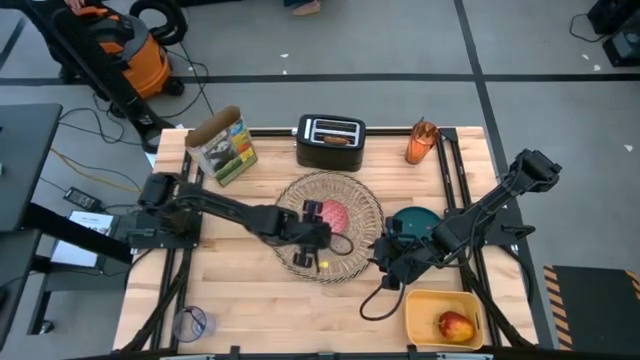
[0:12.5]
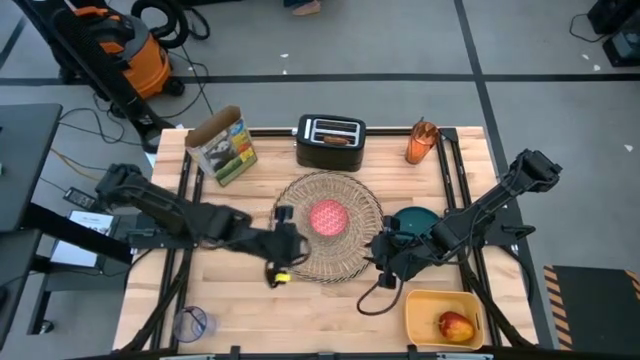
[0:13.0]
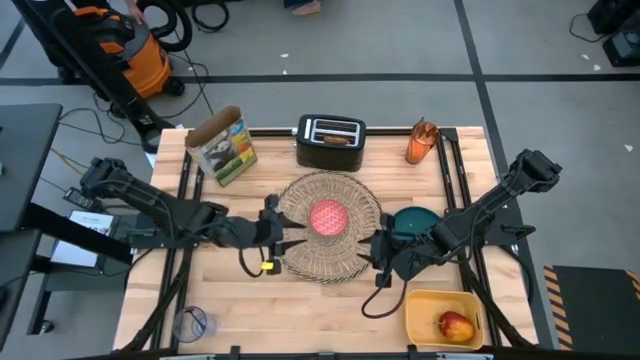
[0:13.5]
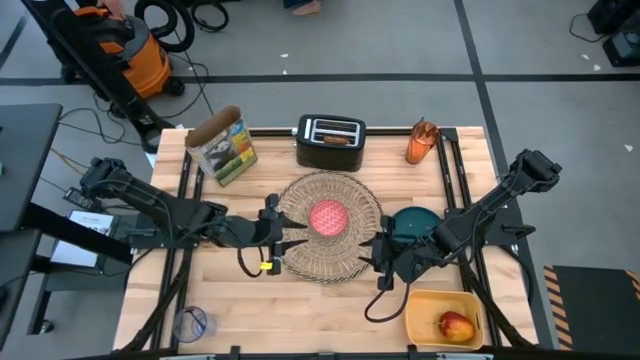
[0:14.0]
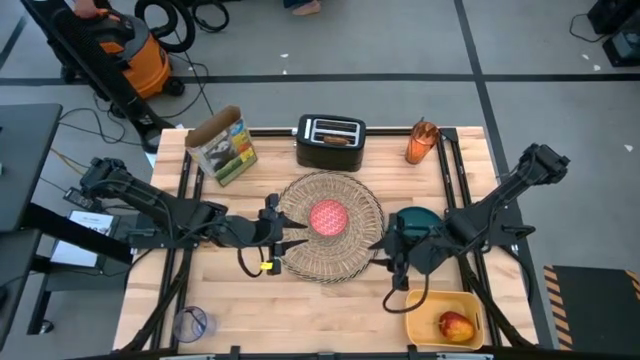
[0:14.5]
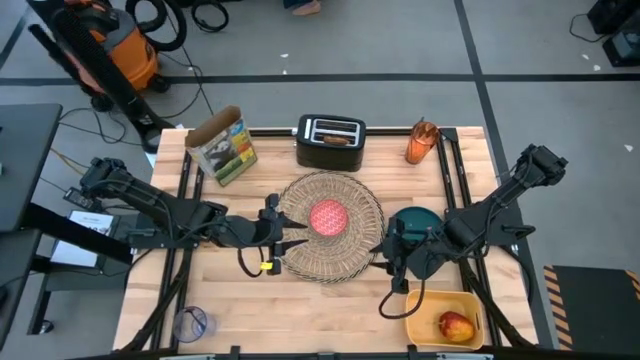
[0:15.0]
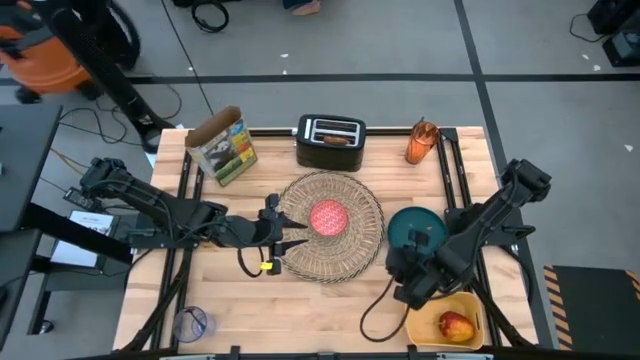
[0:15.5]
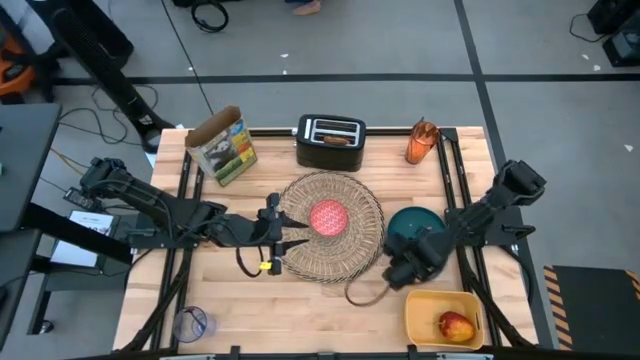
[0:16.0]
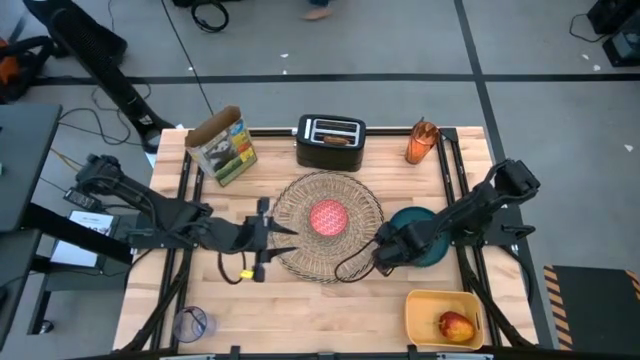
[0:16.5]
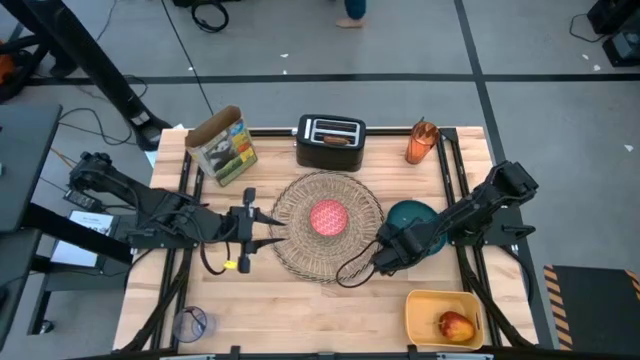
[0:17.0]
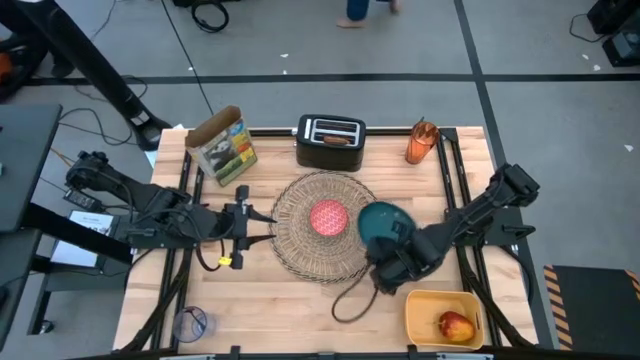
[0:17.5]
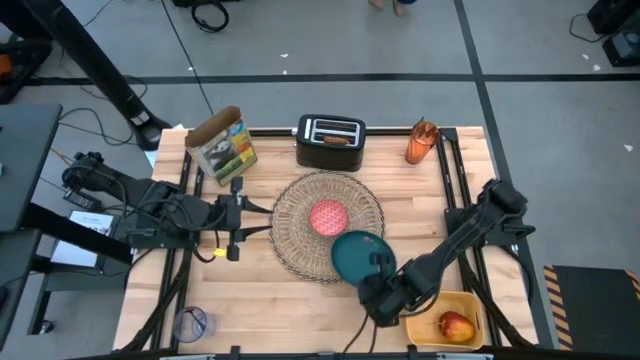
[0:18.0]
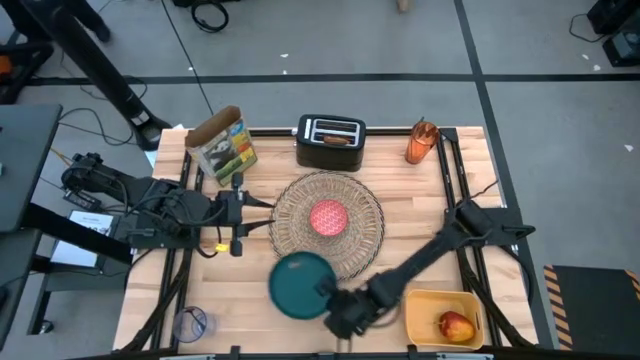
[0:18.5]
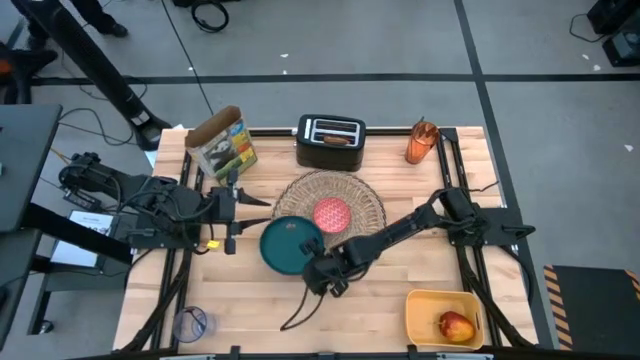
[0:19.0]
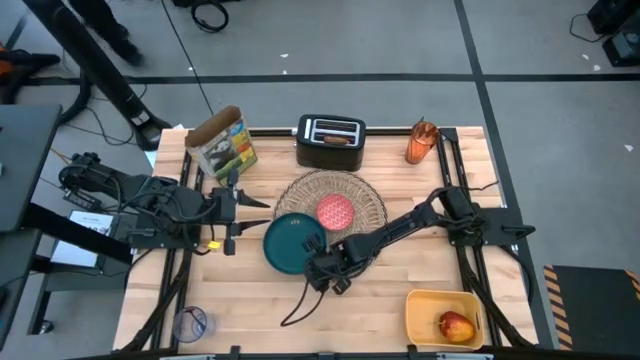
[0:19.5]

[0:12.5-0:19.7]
Task: Arrange a breakfast setting
Put the plate on the place mat

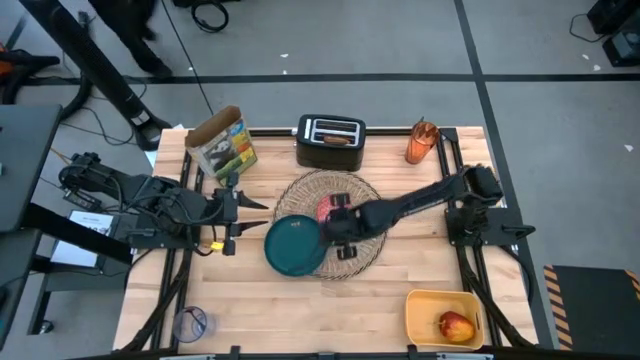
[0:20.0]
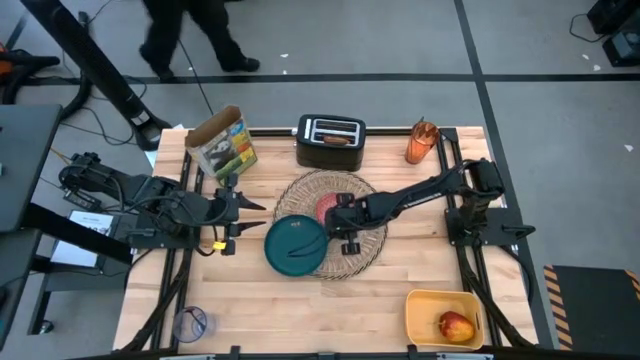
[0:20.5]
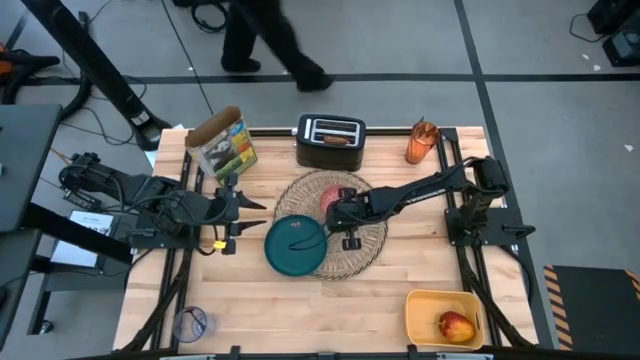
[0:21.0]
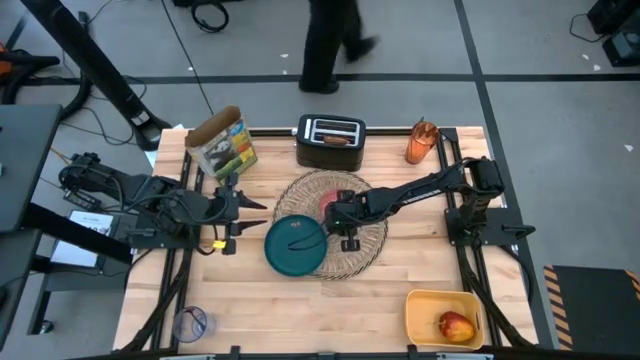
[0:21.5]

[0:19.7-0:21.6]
Adjust the bowl on the place mat

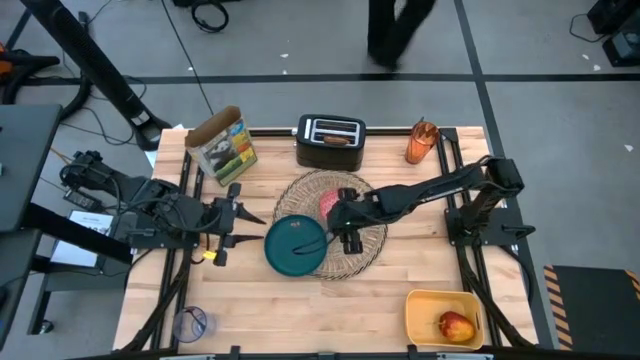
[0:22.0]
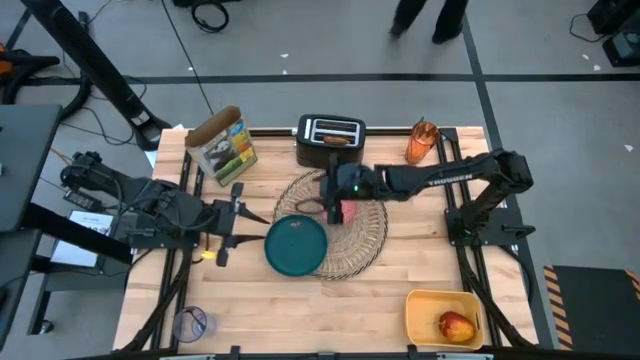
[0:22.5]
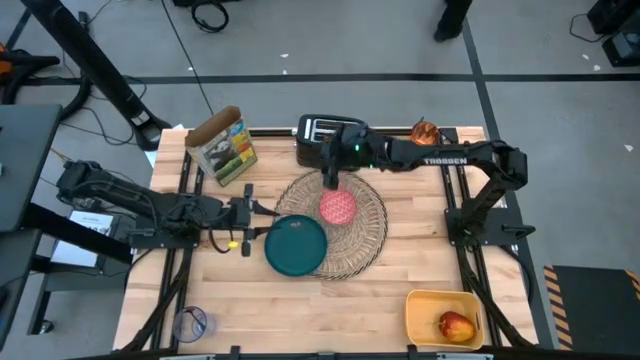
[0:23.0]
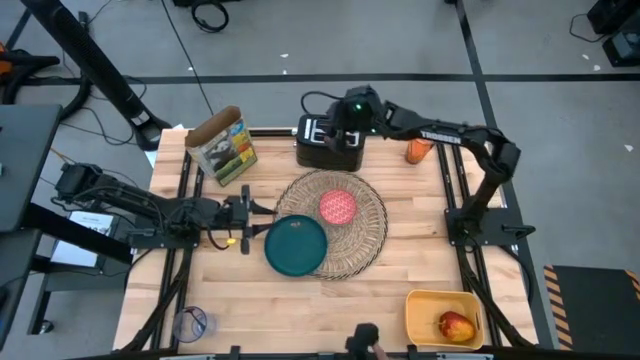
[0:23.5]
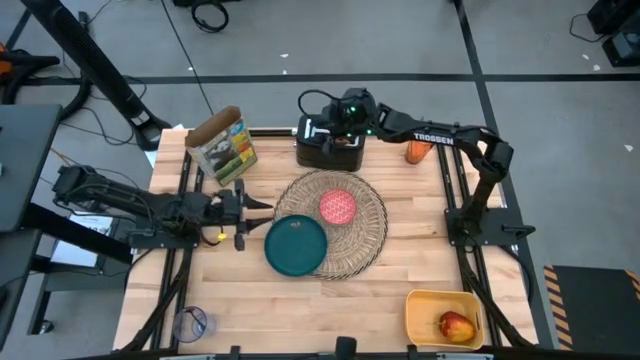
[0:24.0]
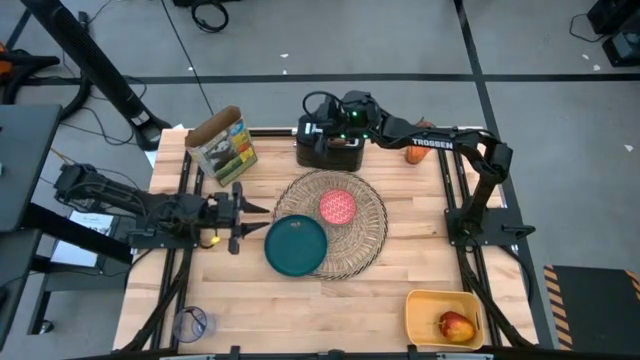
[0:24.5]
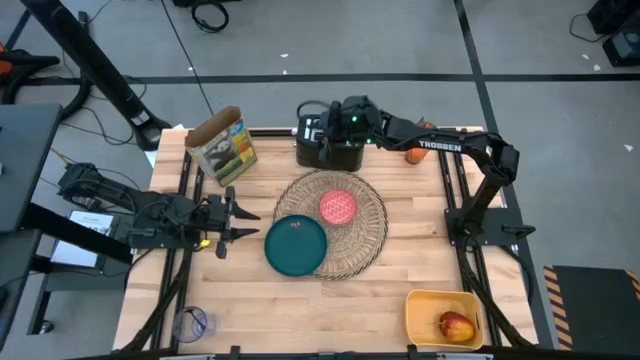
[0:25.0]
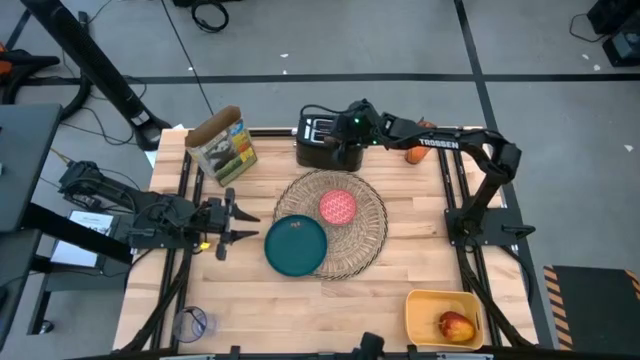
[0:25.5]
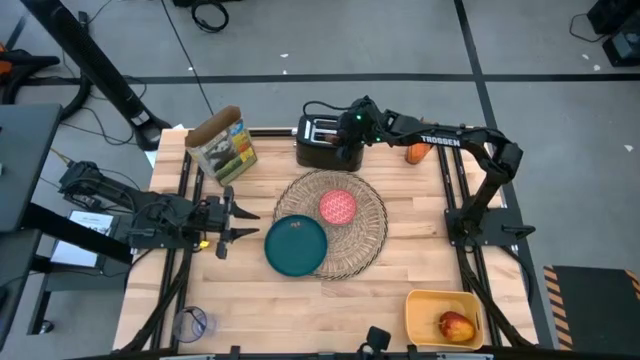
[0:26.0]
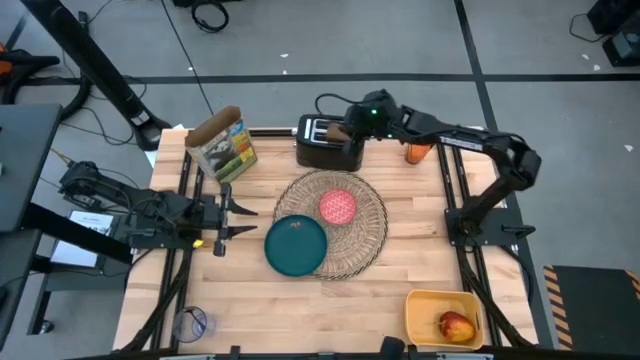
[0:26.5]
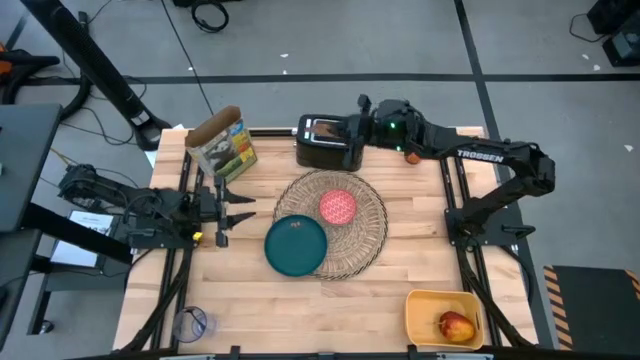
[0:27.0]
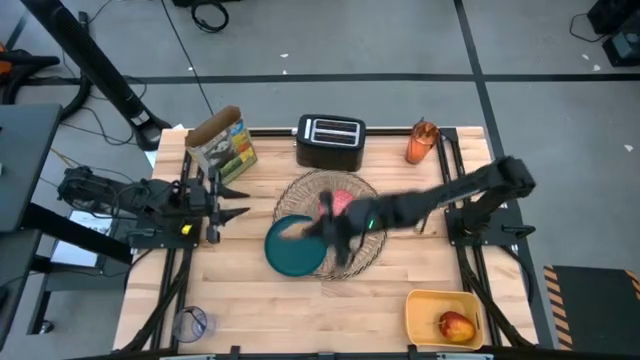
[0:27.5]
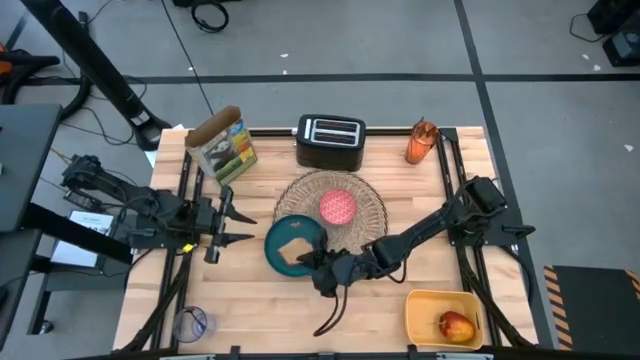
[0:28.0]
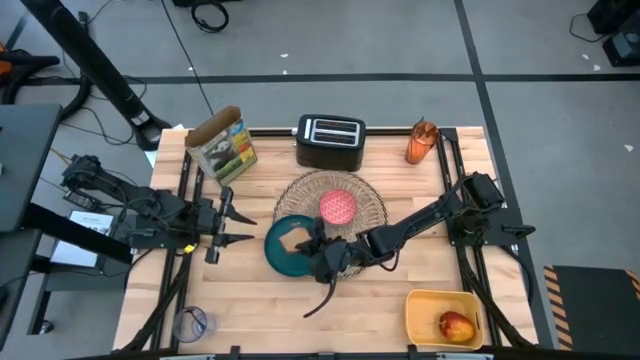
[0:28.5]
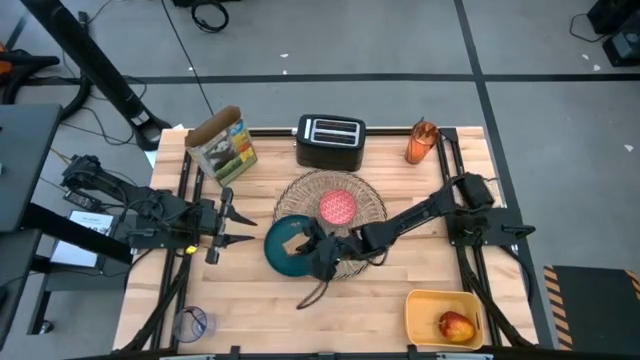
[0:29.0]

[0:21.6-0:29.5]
Put the toasted bread on the plate

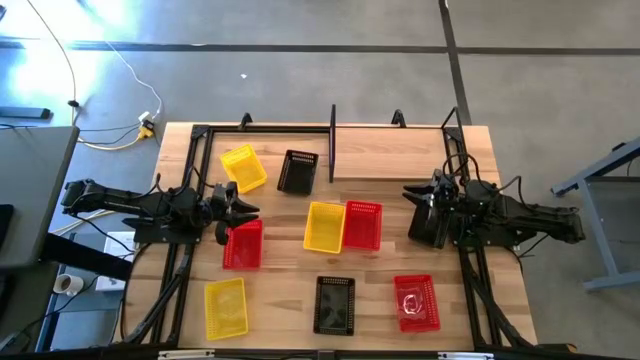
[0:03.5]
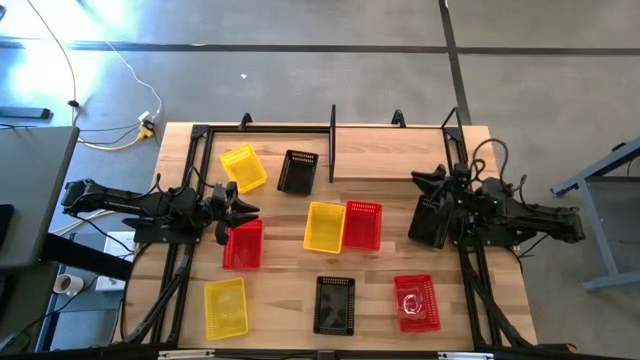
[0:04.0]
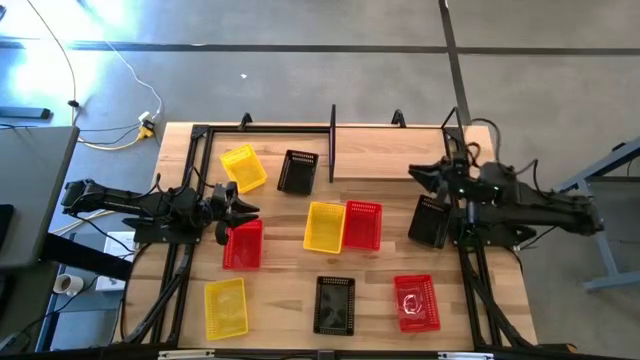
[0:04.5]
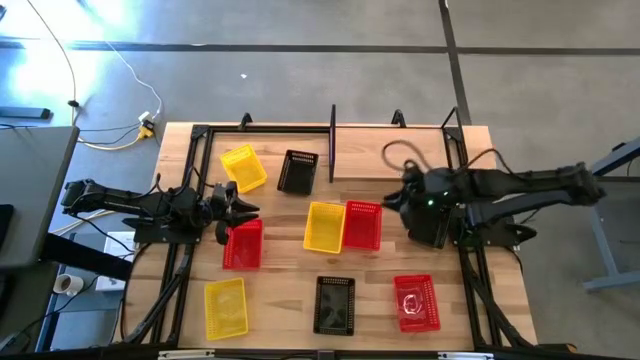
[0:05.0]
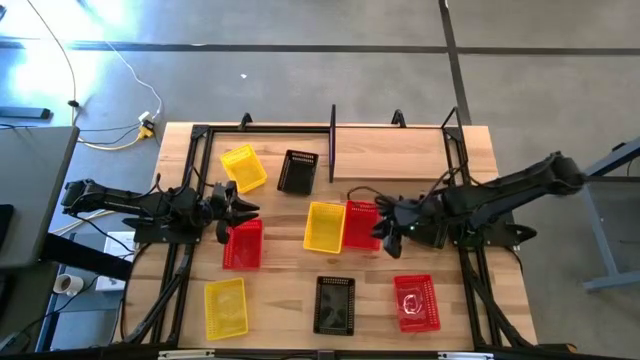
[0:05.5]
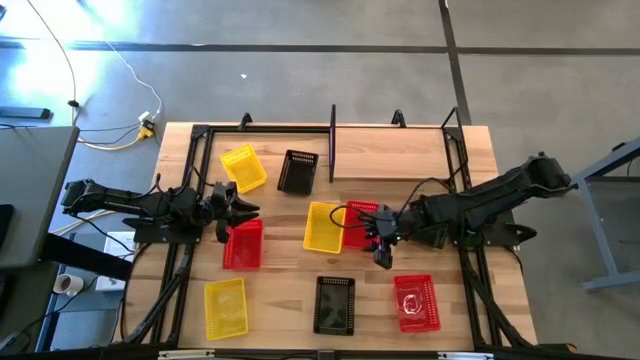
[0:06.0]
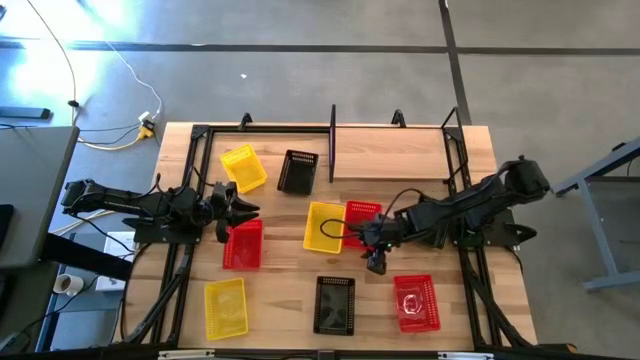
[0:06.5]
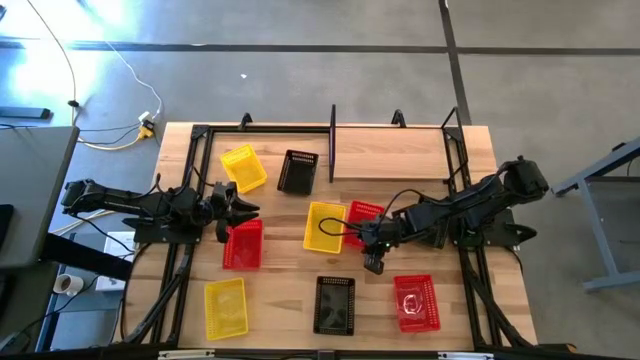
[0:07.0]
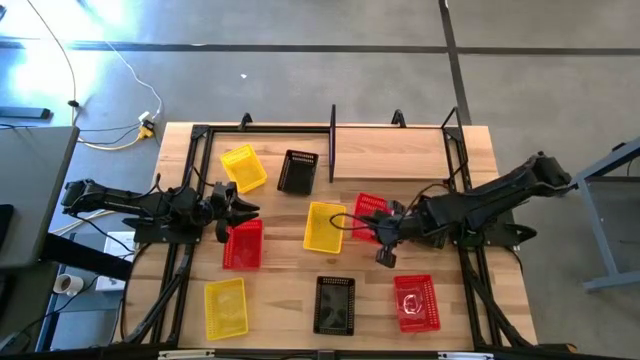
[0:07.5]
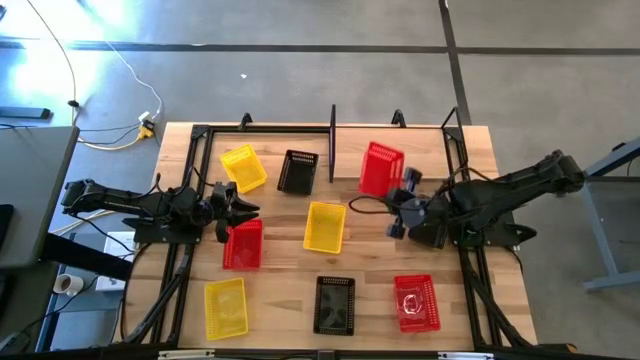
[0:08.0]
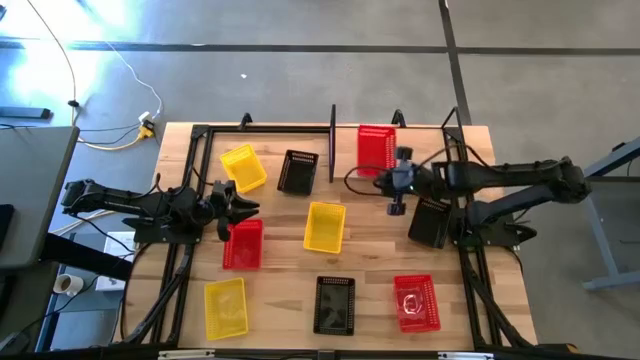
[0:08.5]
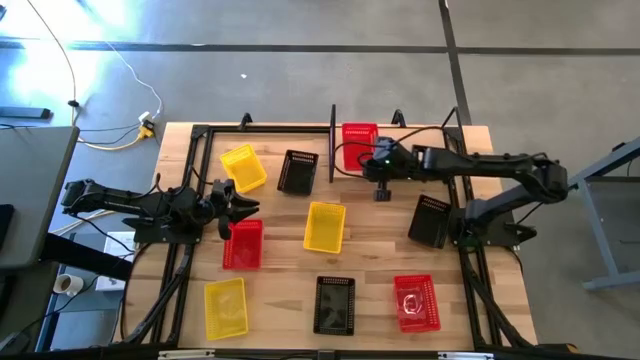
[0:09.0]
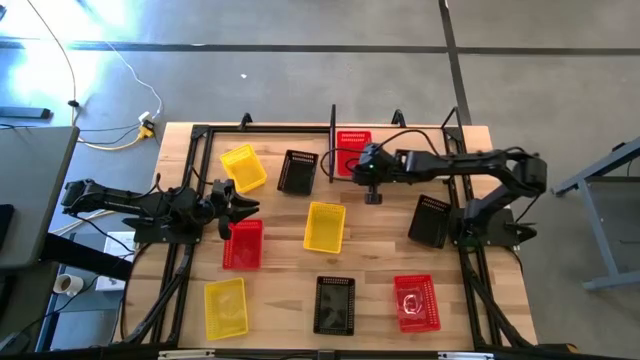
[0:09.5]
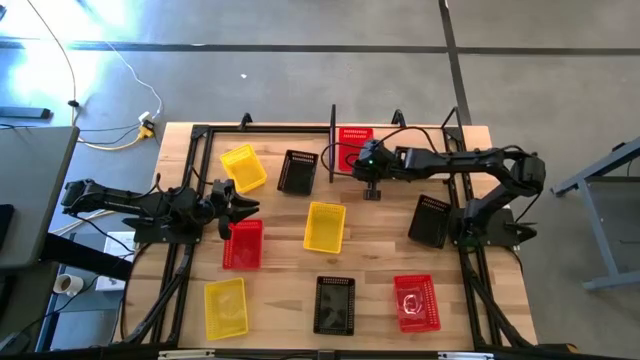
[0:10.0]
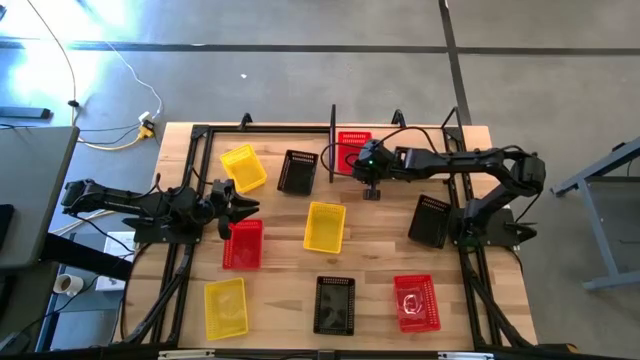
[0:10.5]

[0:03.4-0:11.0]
Task: Stack baskets on shelf by color
Put the middle red bin on the shelf
